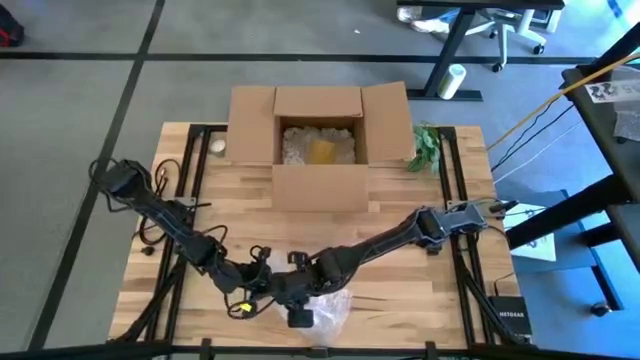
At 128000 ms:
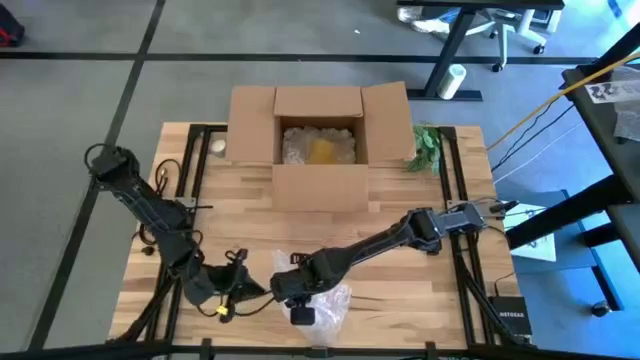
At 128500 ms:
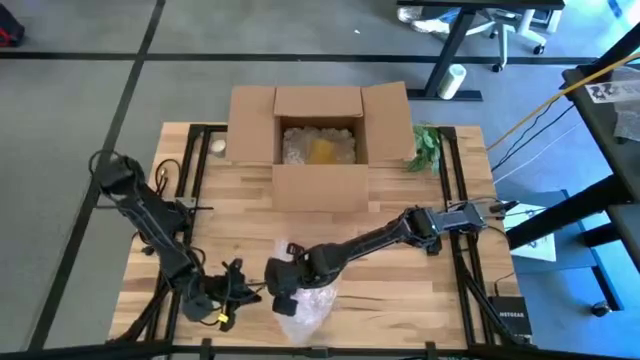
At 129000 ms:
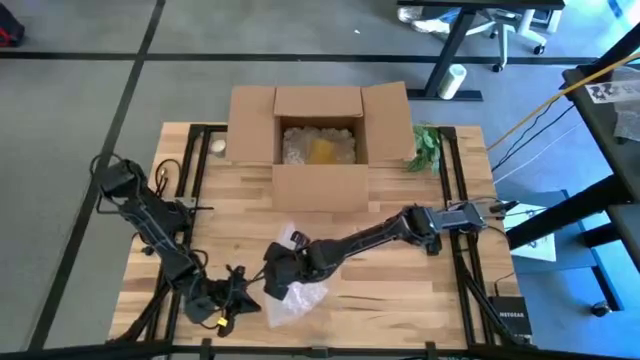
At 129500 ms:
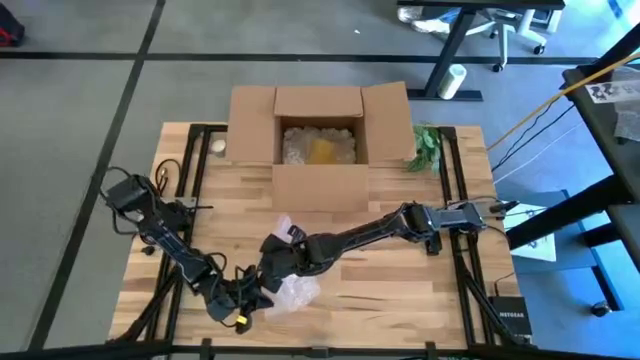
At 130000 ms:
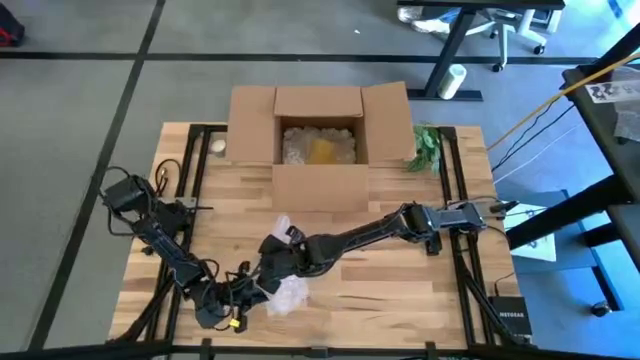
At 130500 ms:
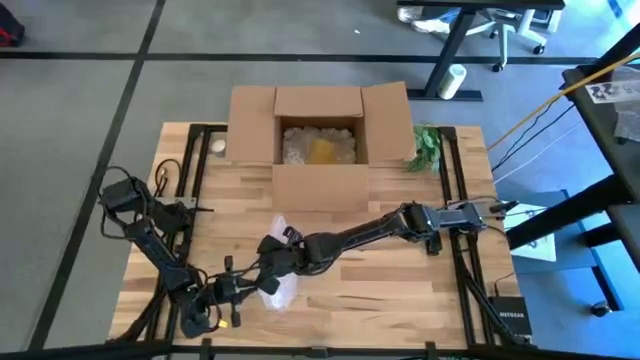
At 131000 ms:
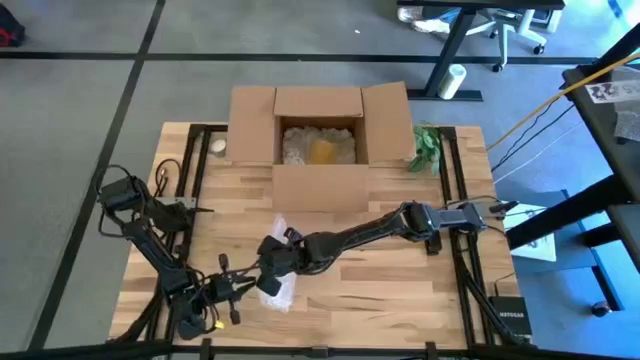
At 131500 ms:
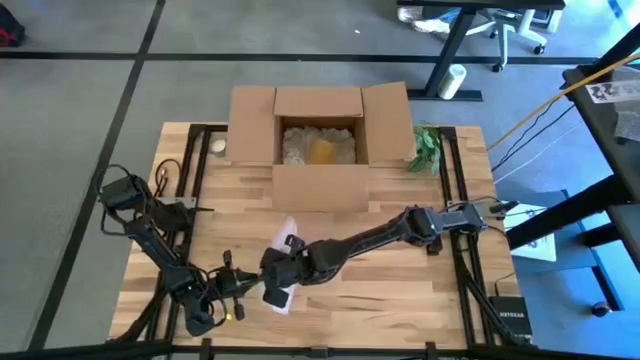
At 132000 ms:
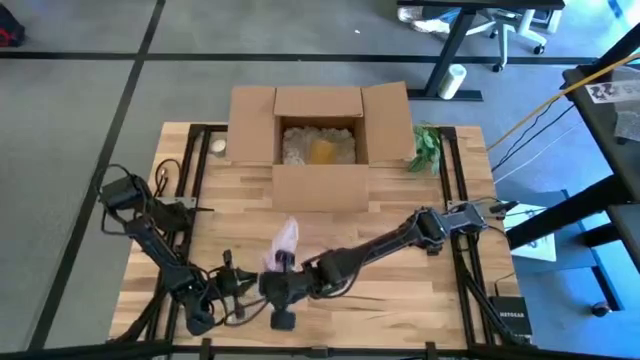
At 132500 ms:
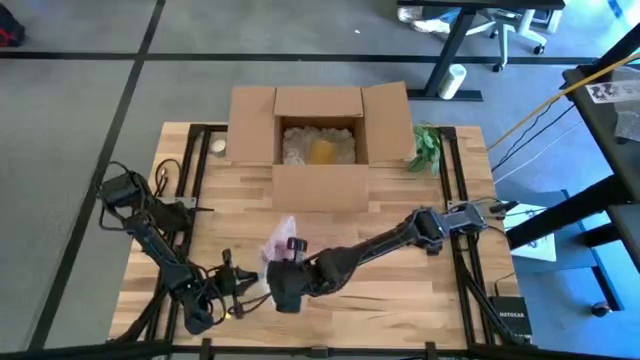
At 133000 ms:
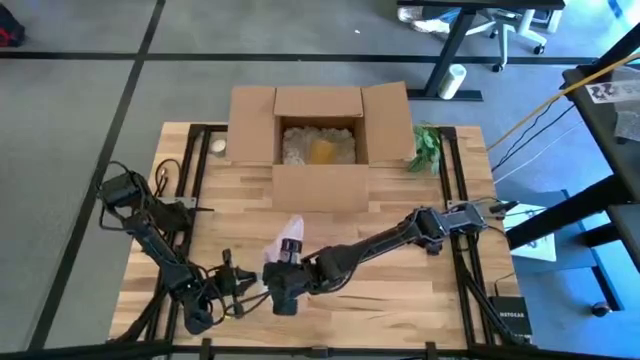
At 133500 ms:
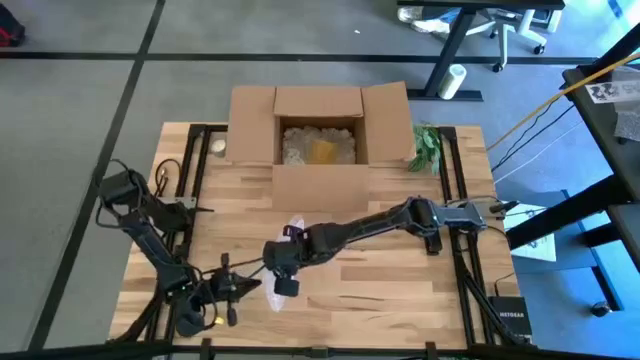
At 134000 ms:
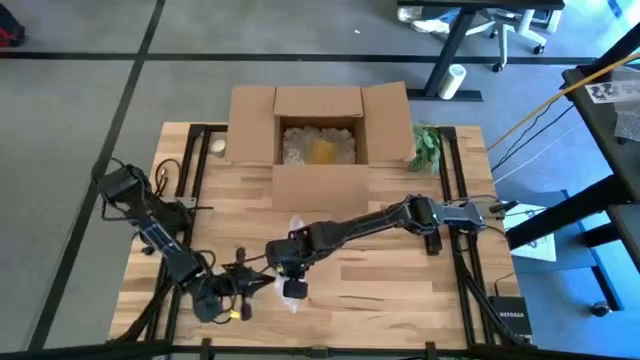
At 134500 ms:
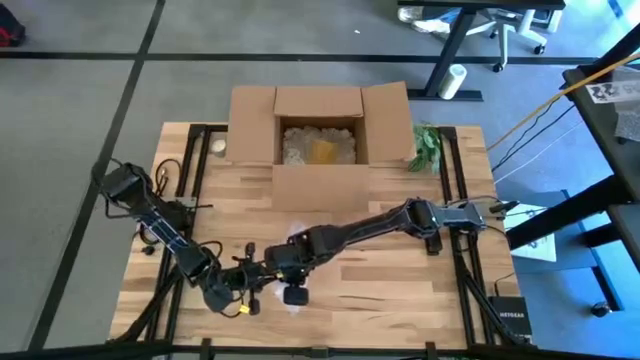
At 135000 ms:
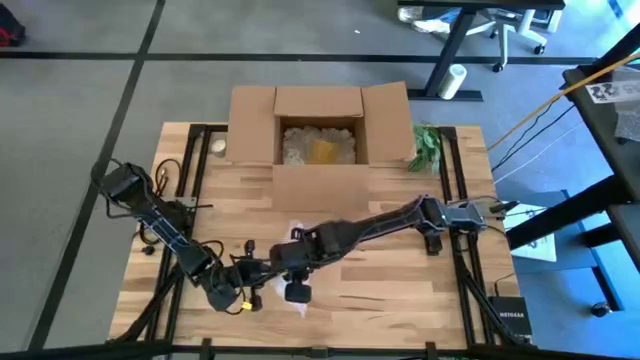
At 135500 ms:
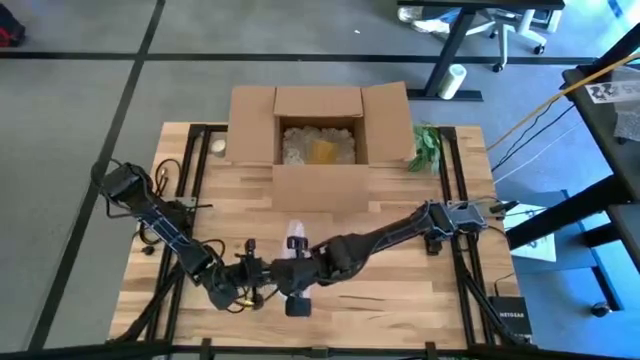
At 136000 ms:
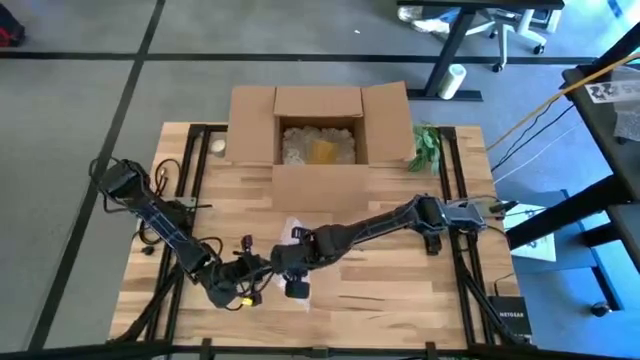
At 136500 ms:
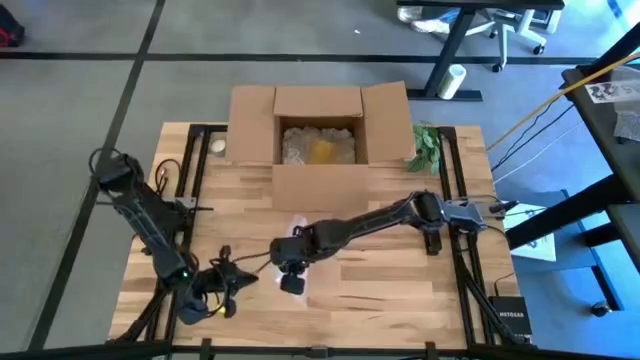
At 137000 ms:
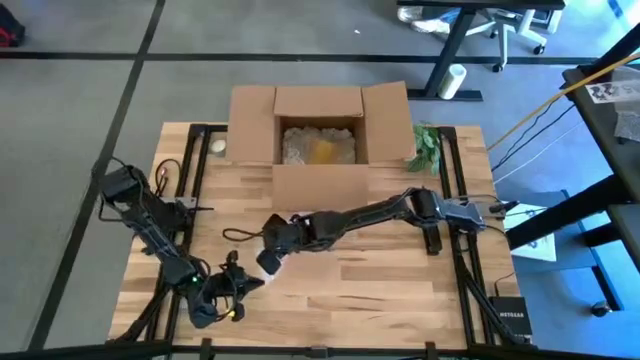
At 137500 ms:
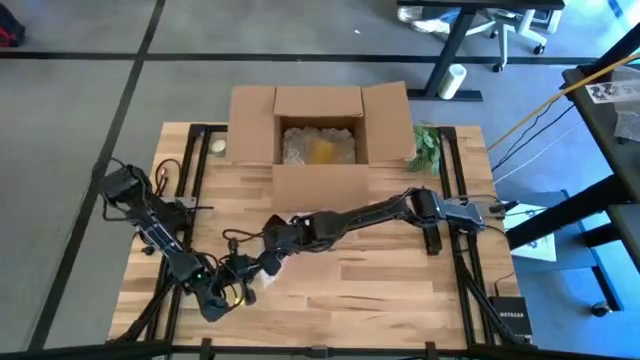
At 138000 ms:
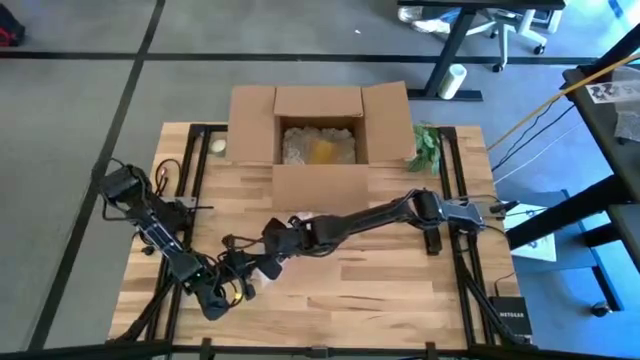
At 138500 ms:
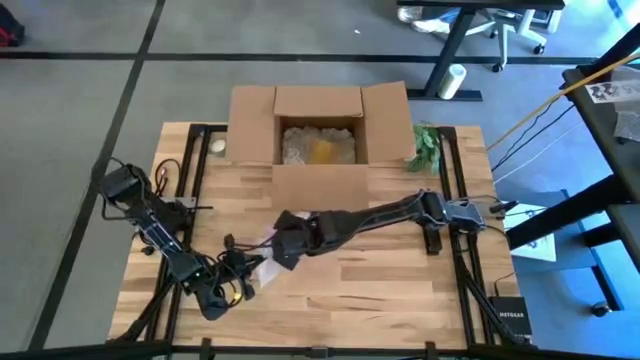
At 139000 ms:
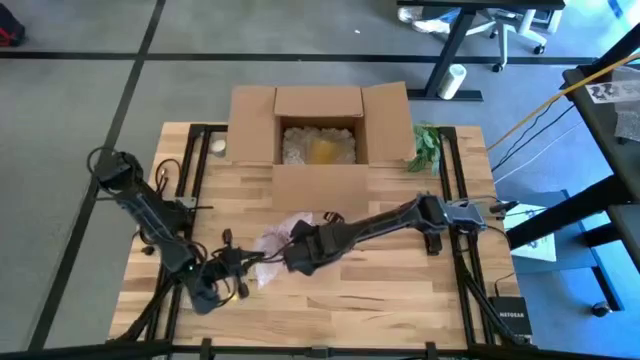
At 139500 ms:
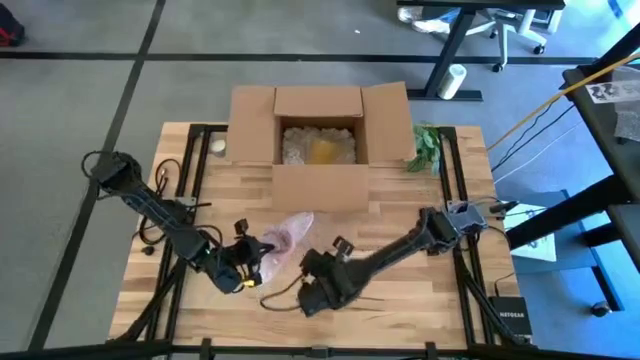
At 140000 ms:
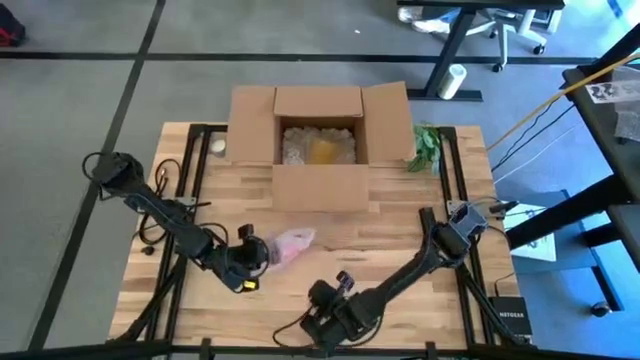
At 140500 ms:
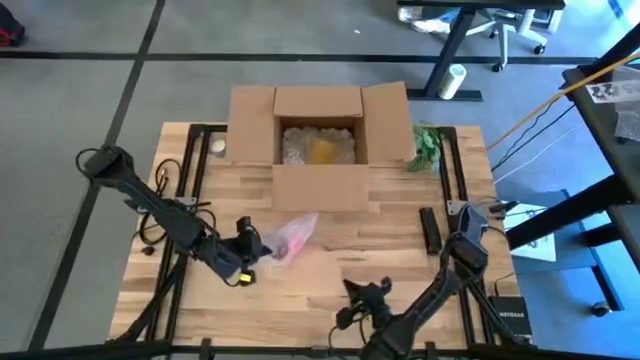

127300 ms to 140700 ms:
Task: wrap mug
Wrap the red mug with the transparent bubble wrap

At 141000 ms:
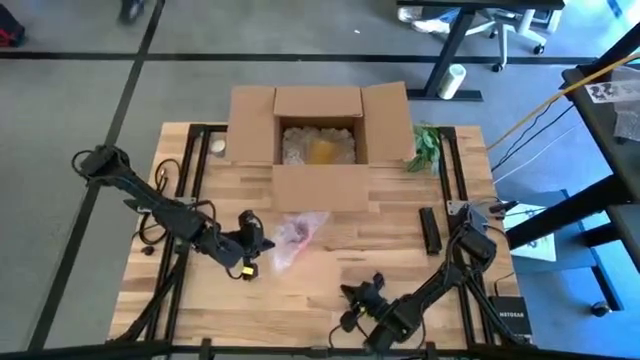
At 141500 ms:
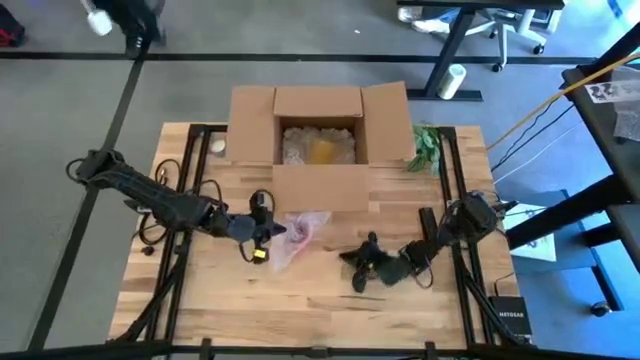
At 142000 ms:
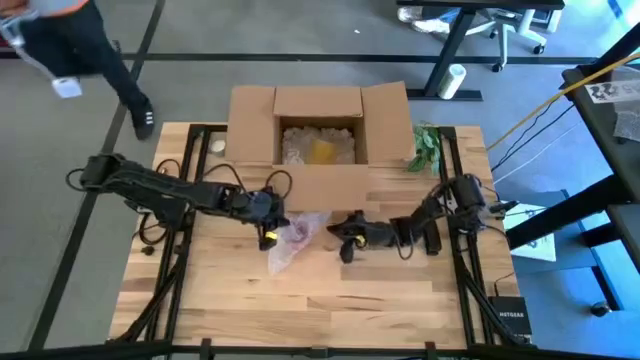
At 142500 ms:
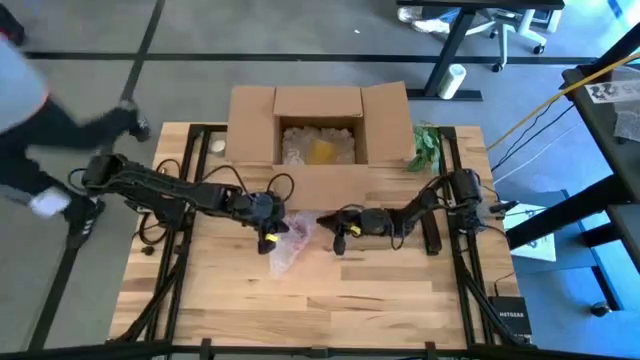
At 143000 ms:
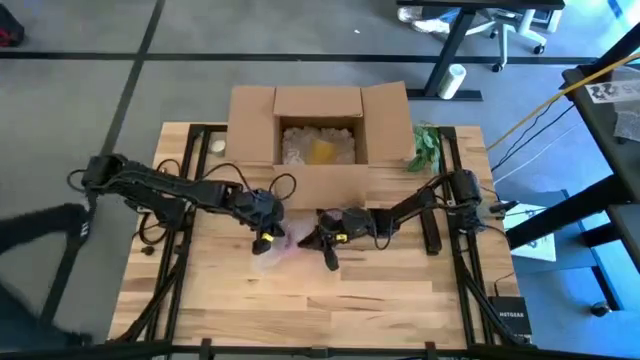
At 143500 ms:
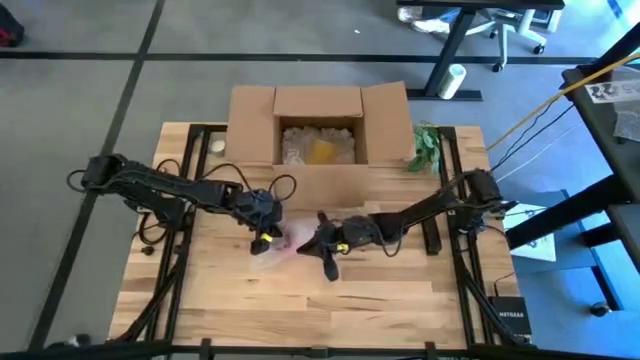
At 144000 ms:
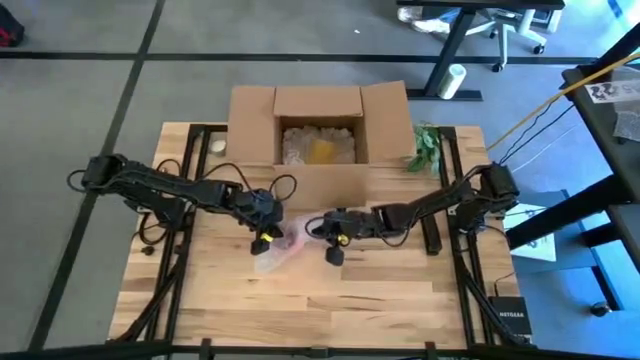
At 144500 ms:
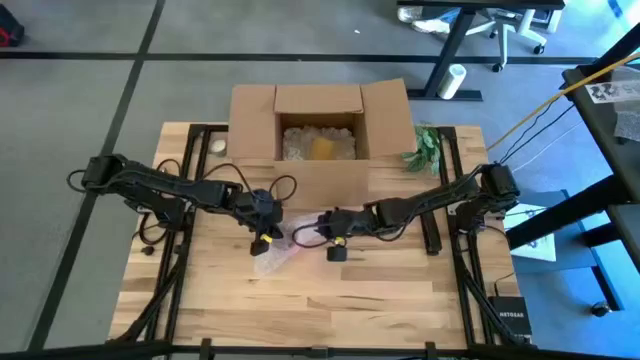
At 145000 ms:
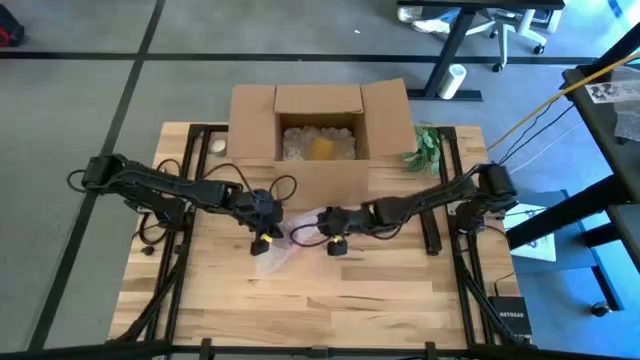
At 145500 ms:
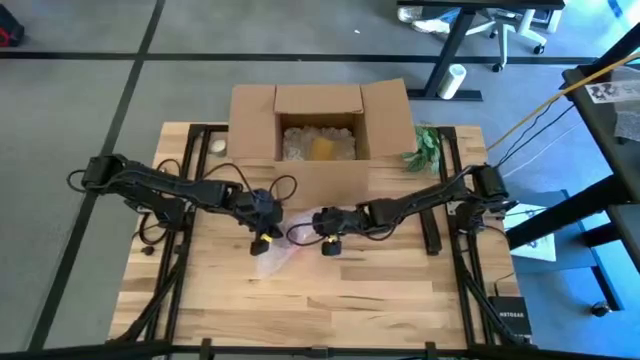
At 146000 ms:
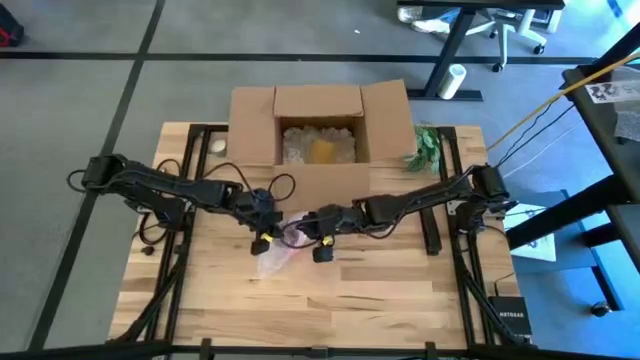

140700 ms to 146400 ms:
Wrap the red mug with the transparent bubble wrap

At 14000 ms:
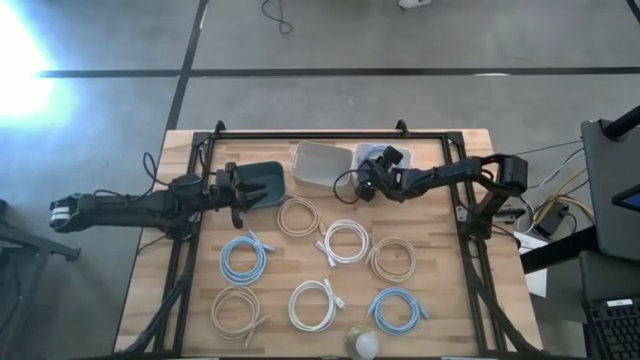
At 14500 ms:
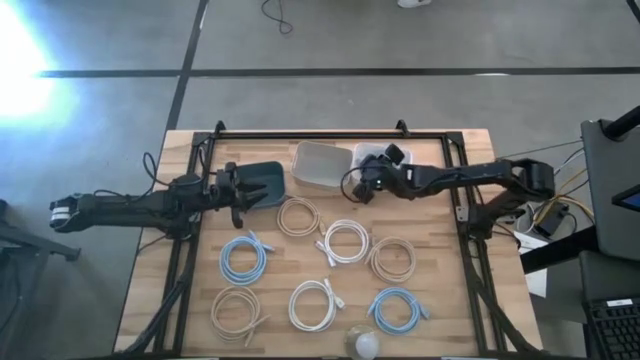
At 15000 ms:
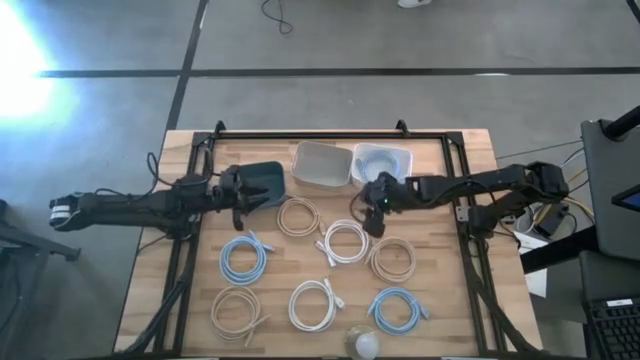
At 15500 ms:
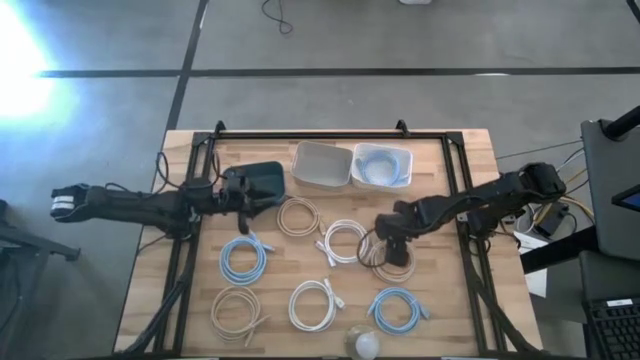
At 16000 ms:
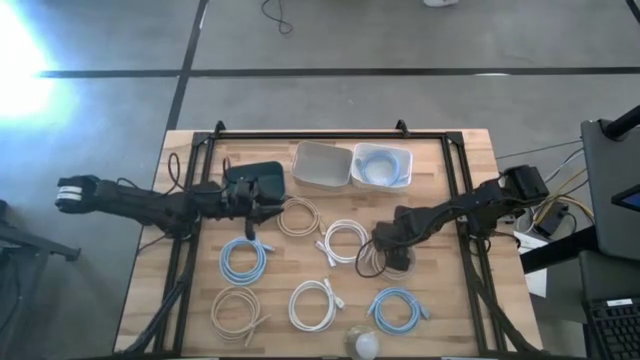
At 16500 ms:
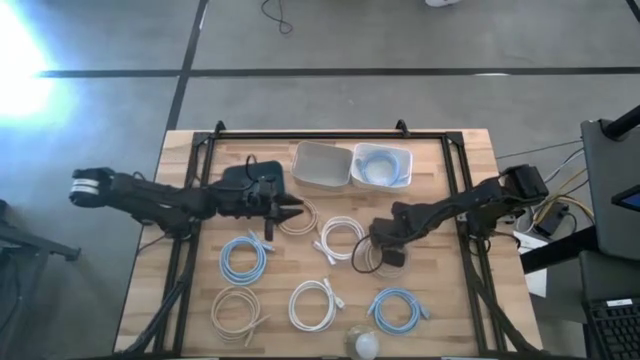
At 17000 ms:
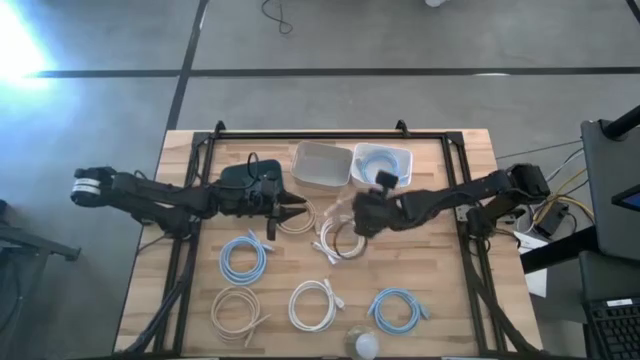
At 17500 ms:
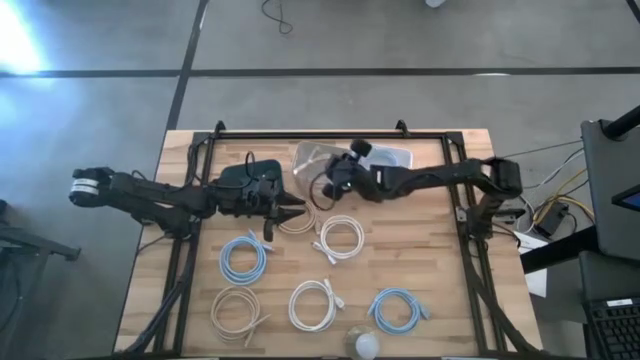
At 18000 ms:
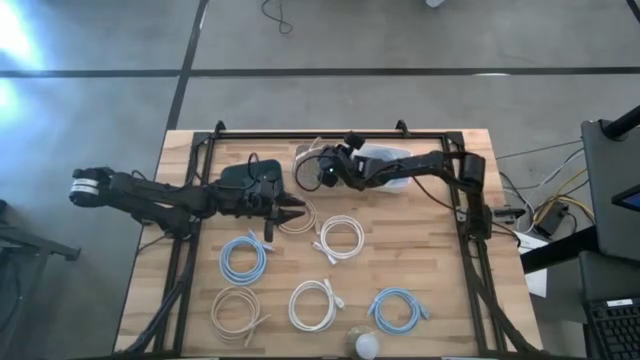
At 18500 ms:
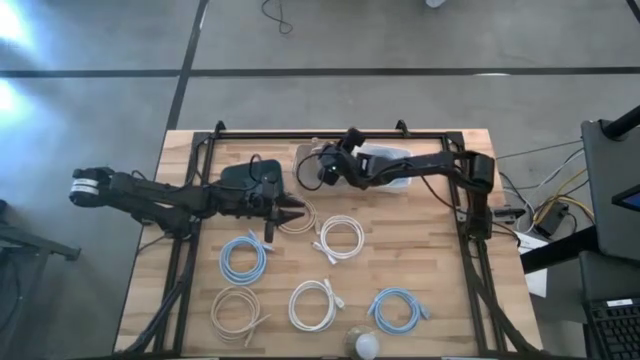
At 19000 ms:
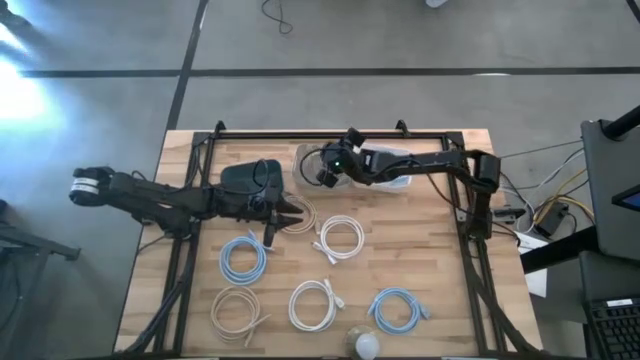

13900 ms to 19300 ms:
Task: Pick & Place USB Port
Put the middle brown USB cable into the gray bin
